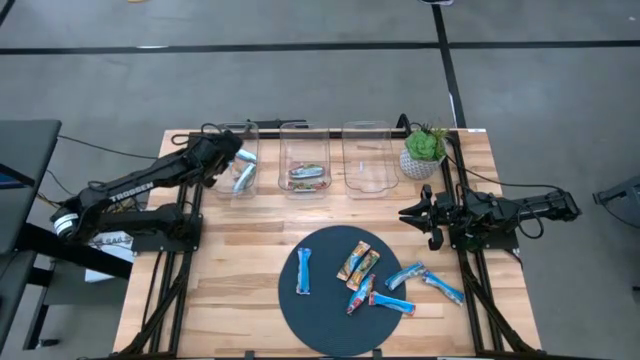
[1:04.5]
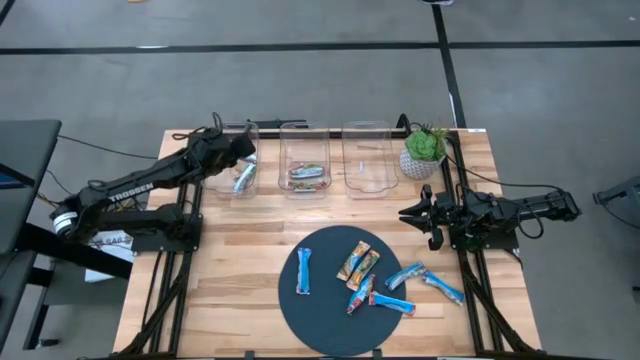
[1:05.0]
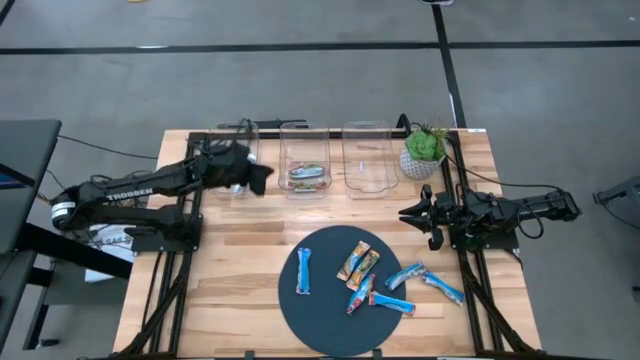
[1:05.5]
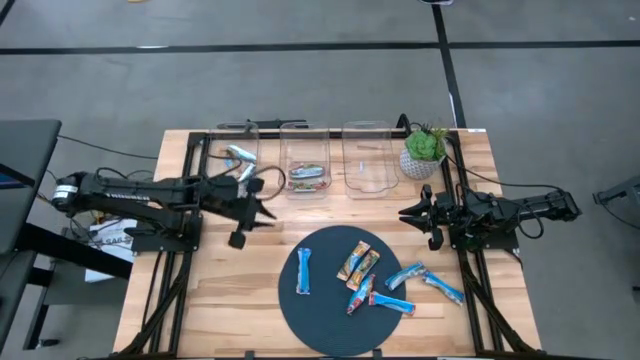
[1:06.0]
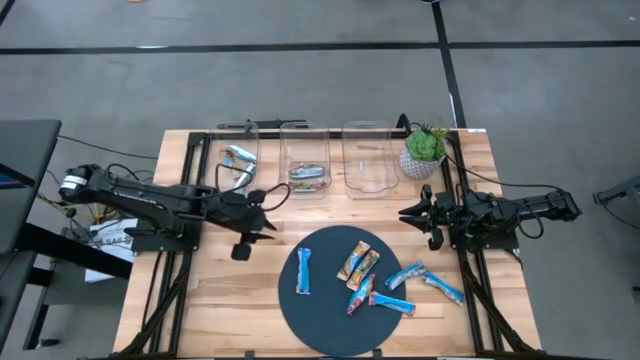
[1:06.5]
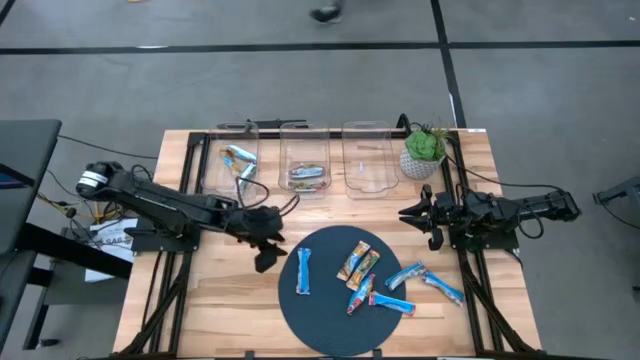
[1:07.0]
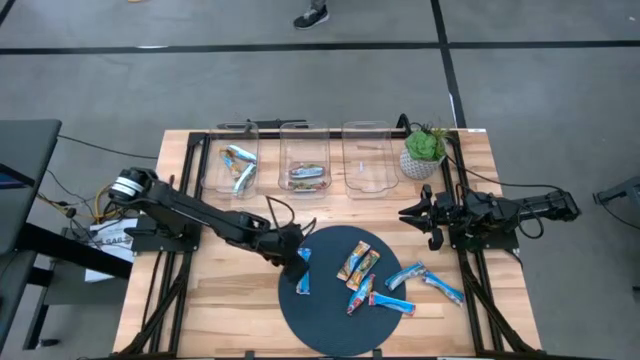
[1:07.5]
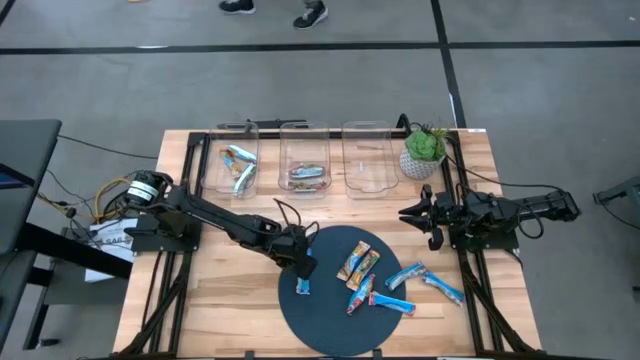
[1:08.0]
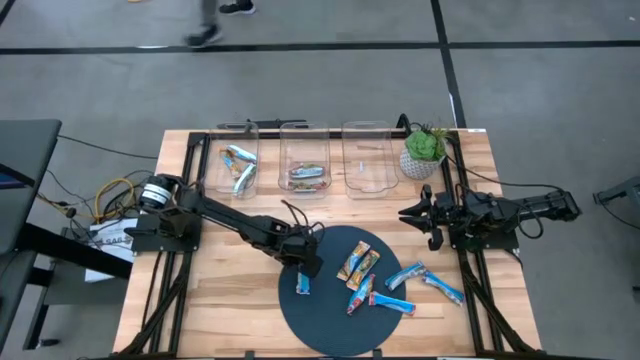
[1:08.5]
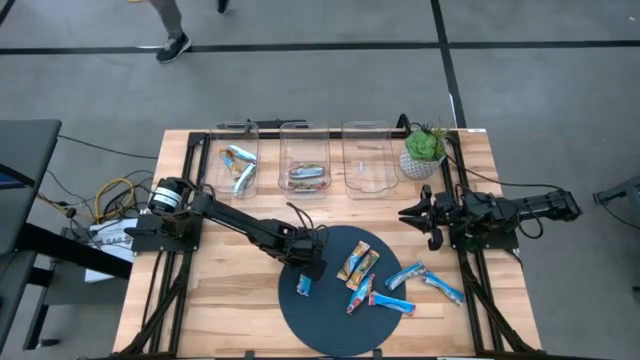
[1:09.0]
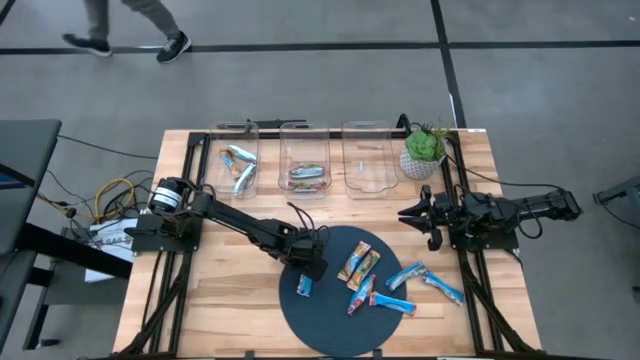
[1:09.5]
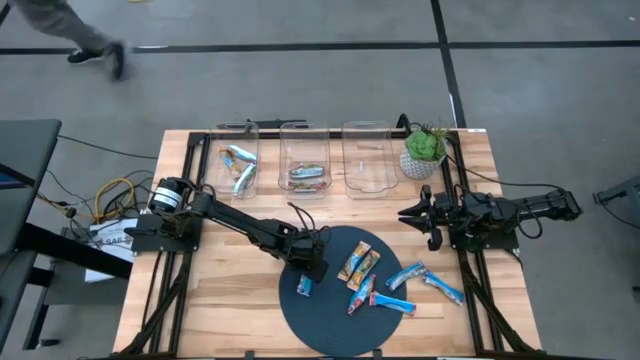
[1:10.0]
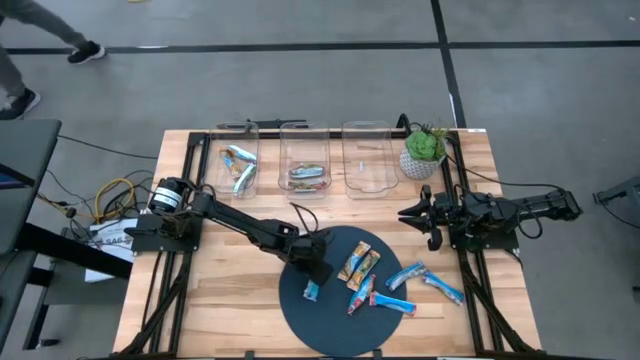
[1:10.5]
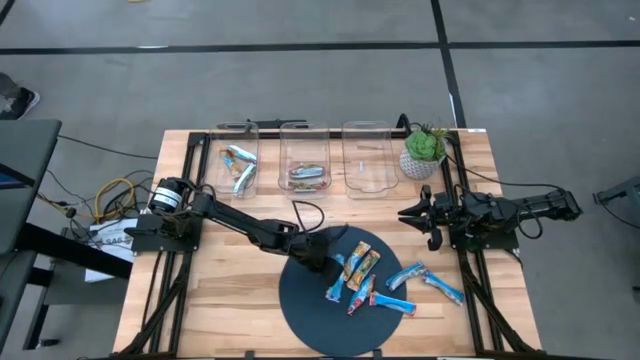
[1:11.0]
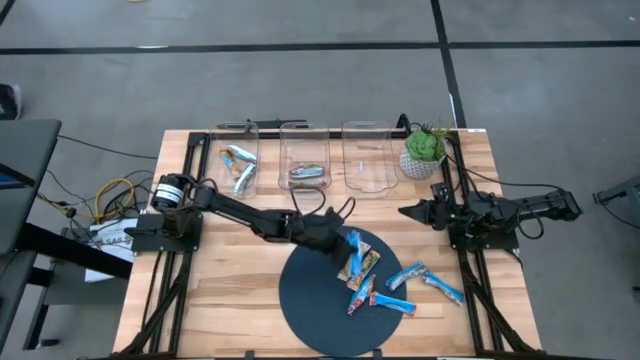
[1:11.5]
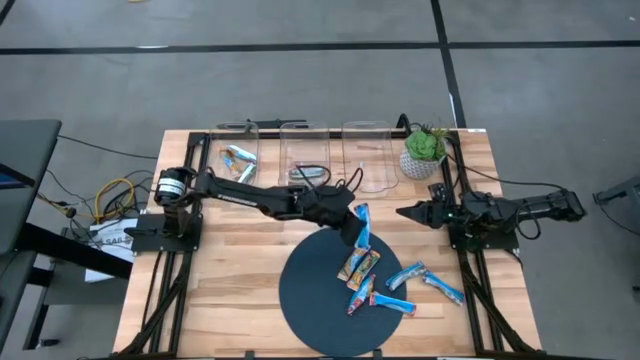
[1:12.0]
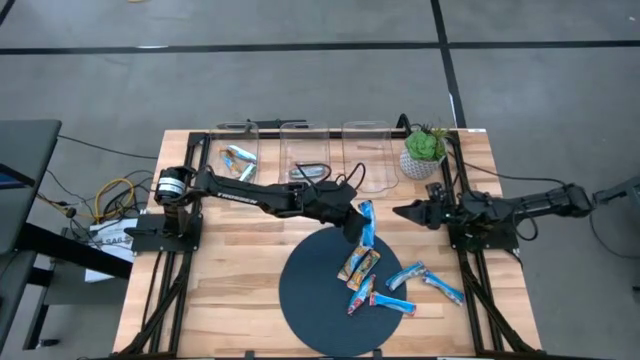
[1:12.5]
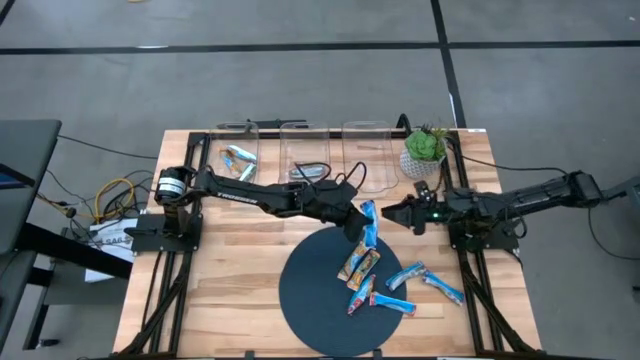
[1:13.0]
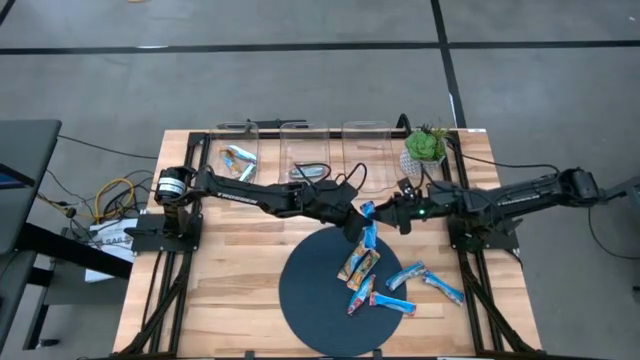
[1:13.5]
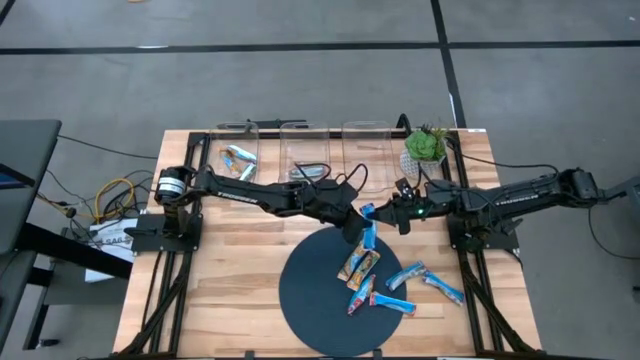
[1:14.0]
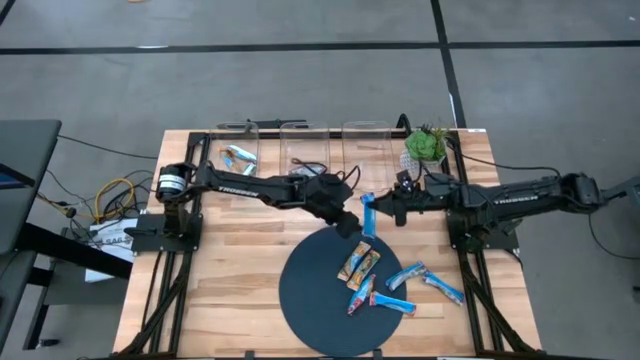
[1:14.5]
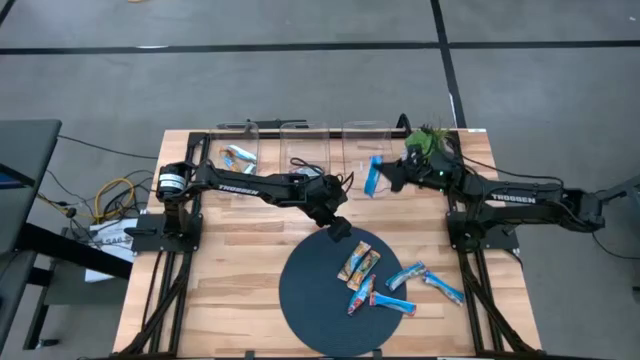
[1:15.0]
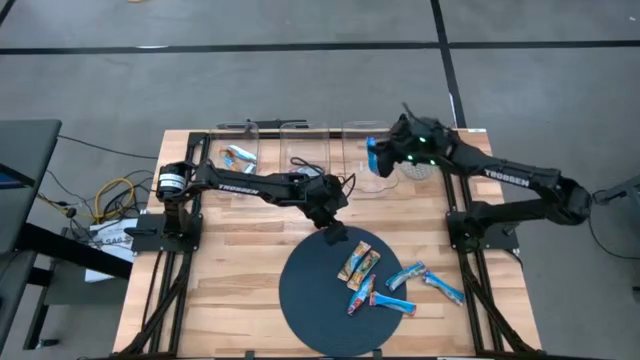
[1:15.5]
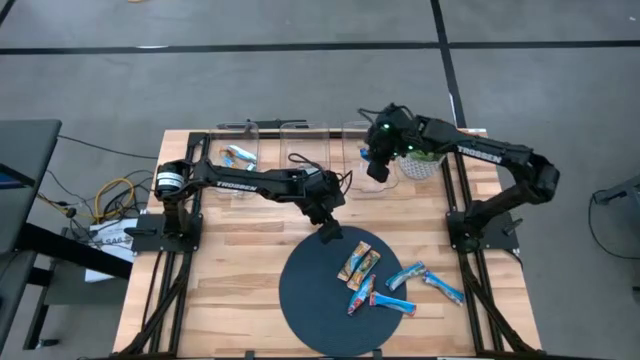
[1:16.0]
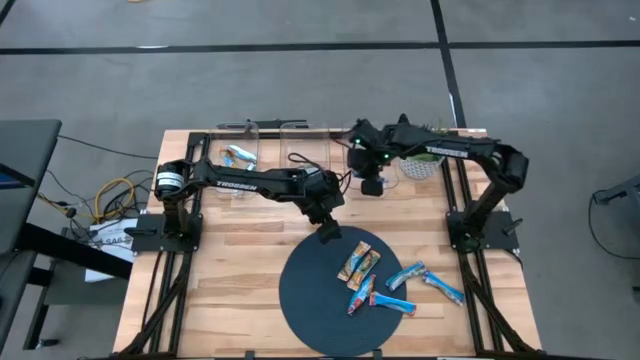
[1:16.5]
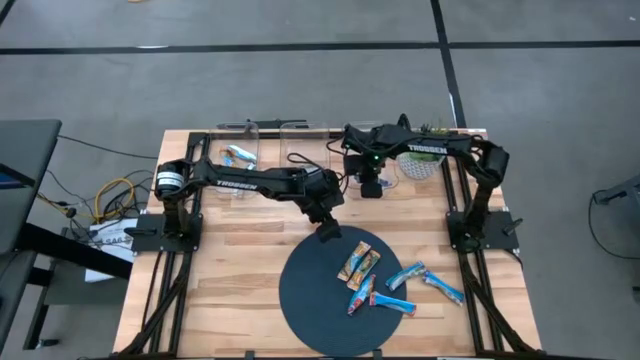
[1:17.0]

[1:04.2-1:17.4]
Task: Pick and place Granola Bars by type
Put the blue granola bar into the right transparent bin
